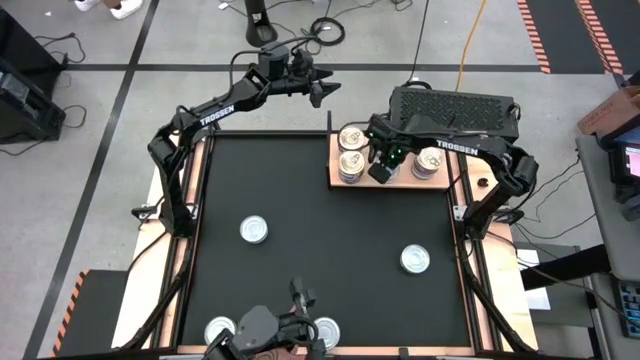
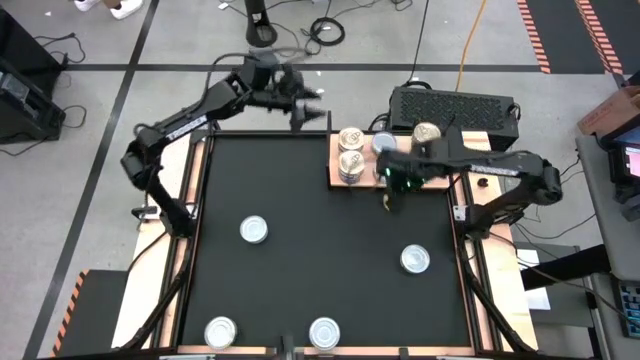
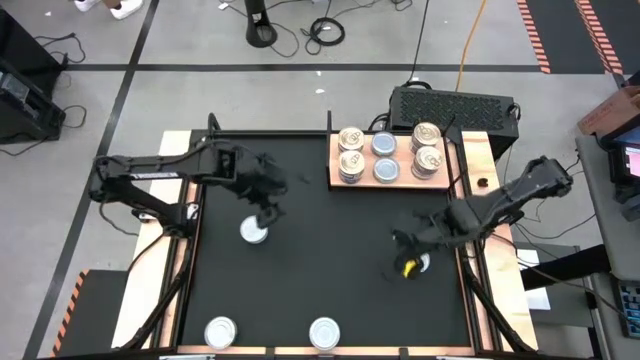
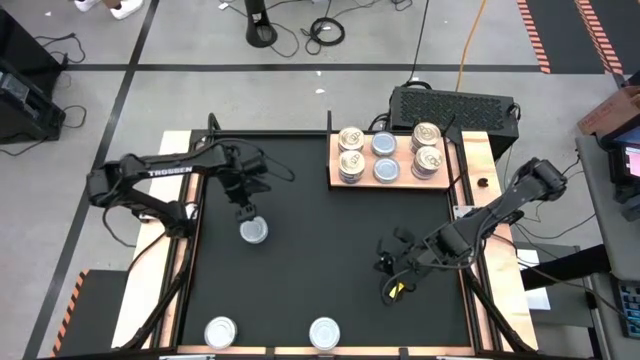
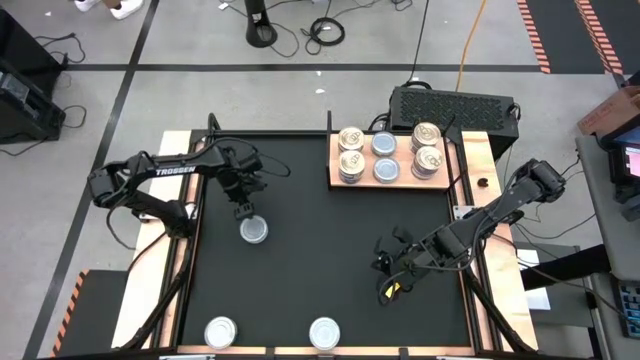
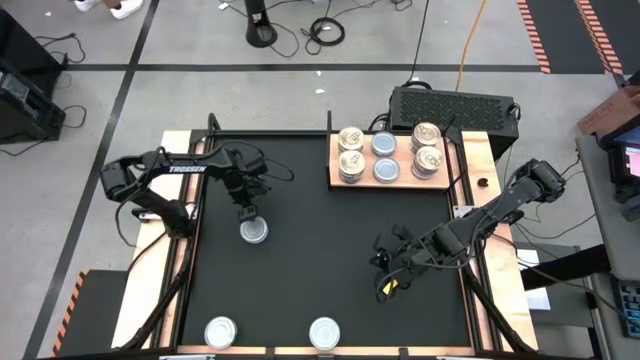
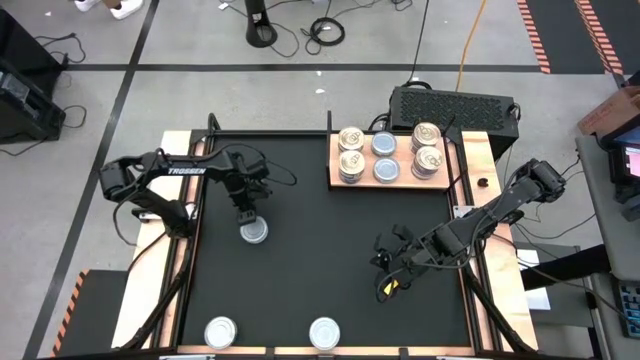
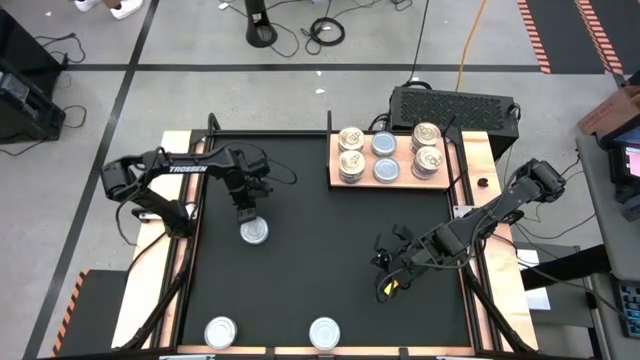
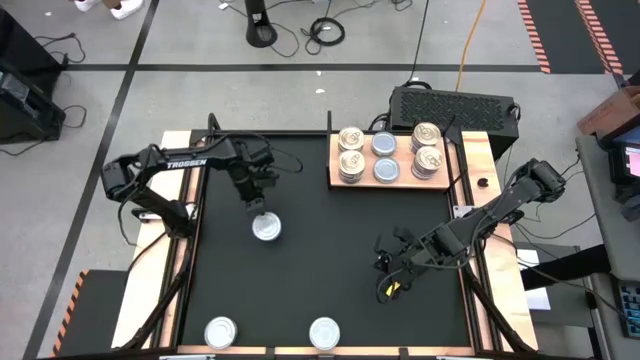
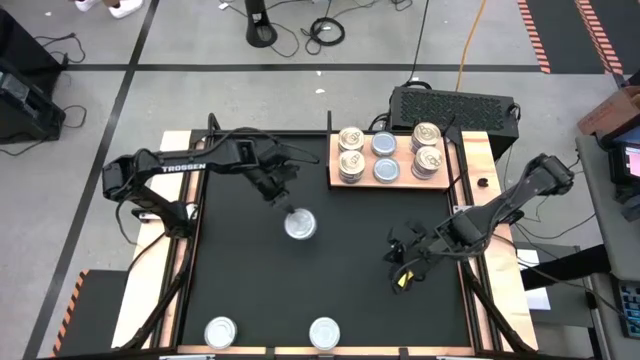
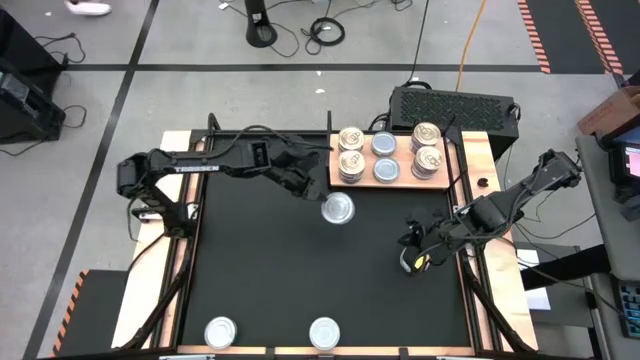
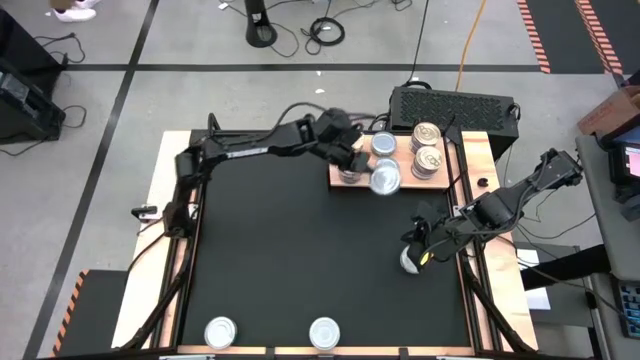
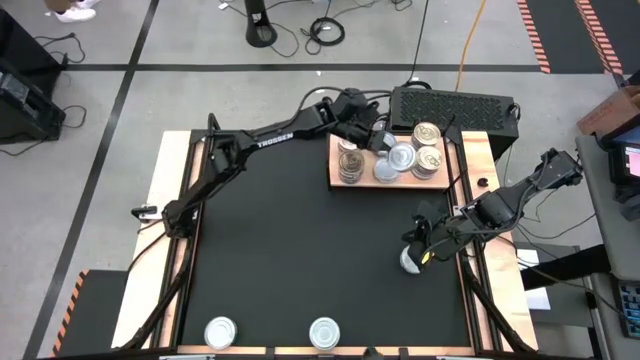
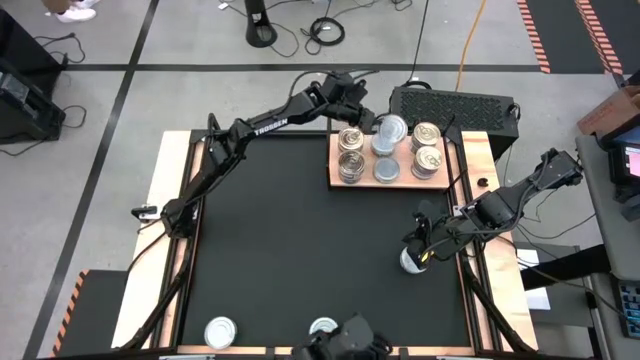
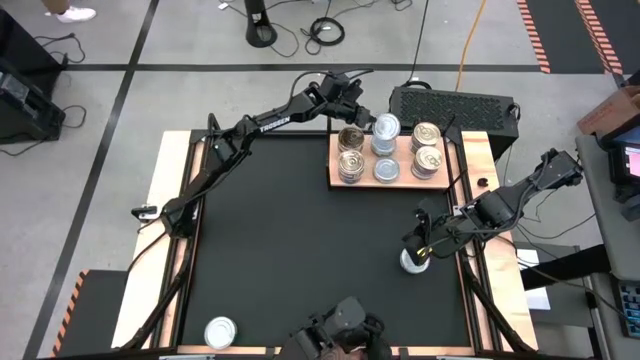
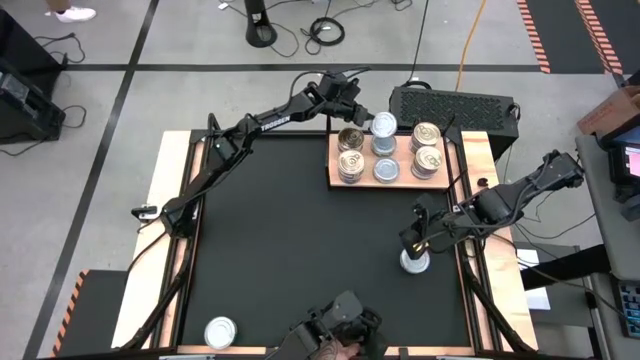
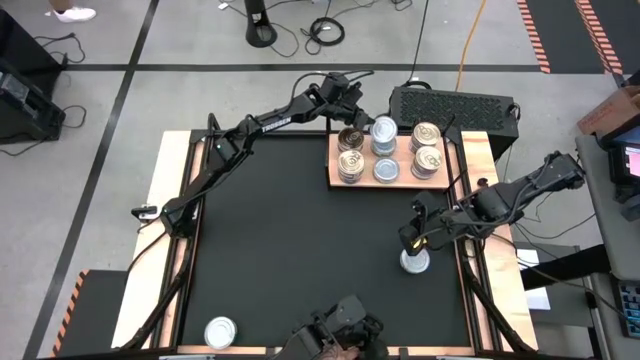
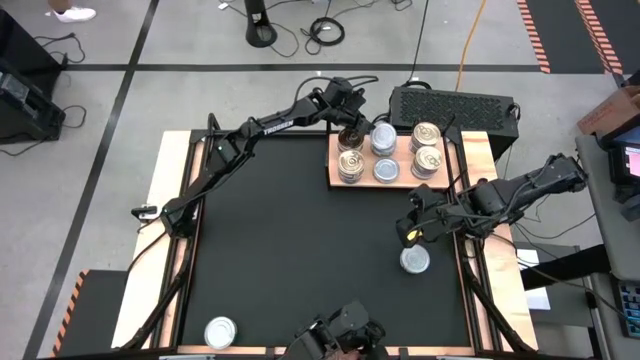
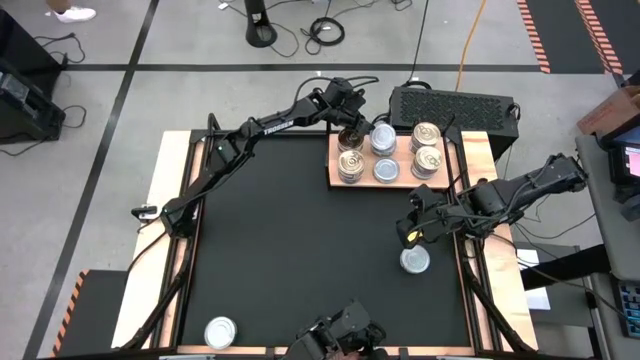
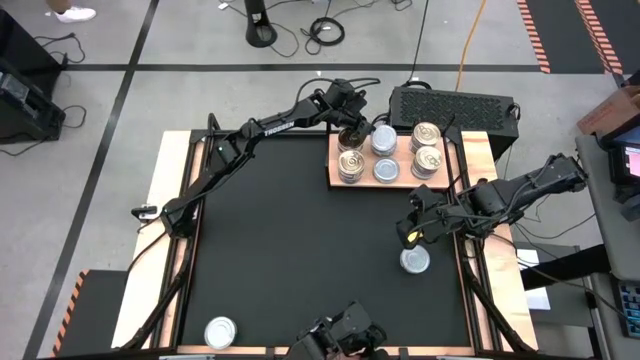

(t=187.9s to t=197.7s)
Task: Stack canned seafood by type on shelf
Stack the green tuna can on top of the other green tuna can on the shelf

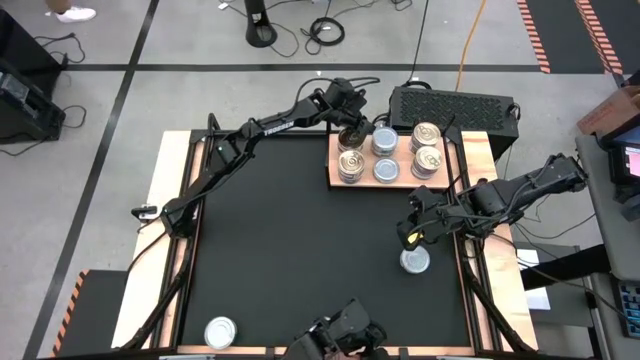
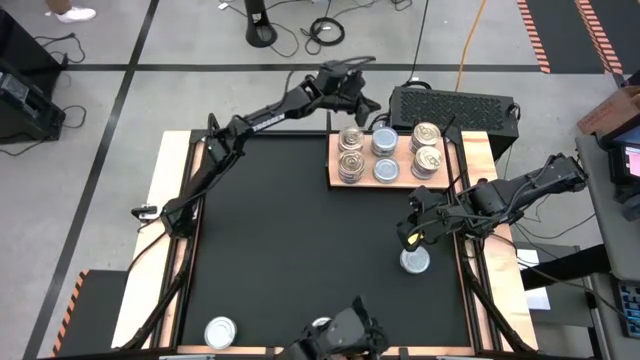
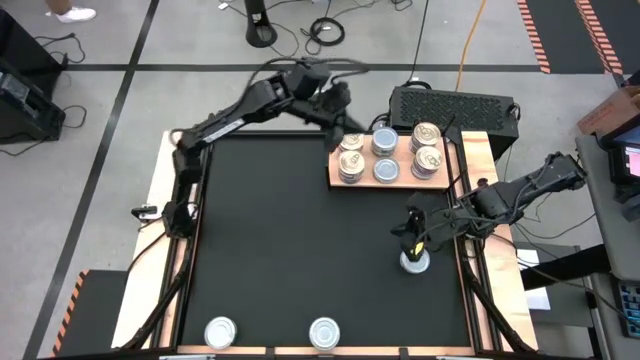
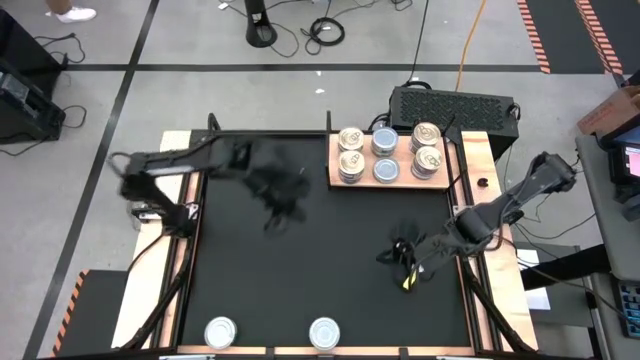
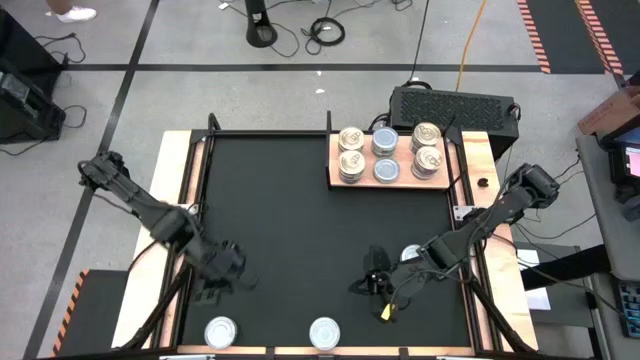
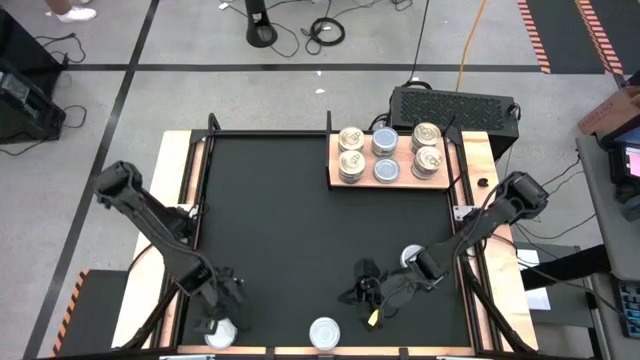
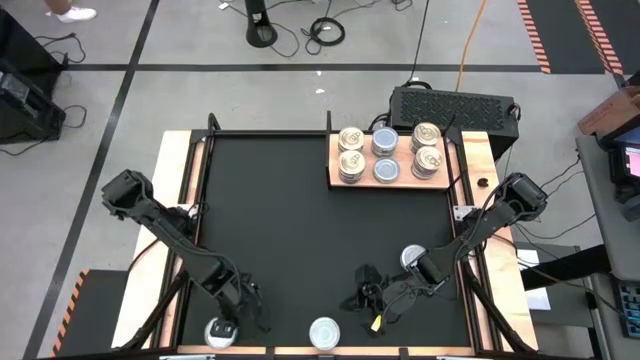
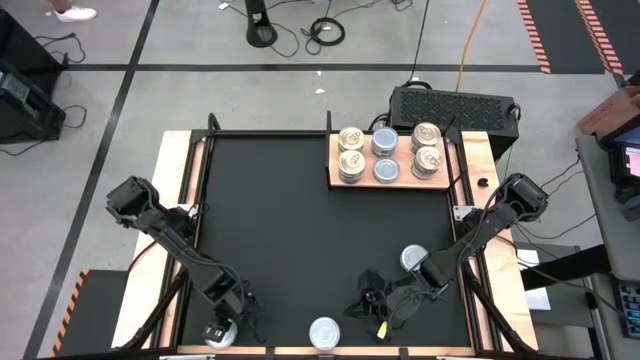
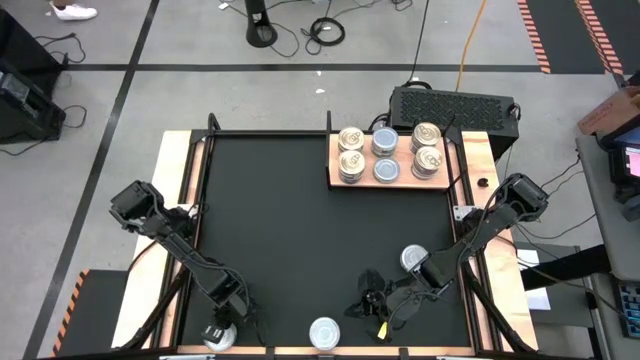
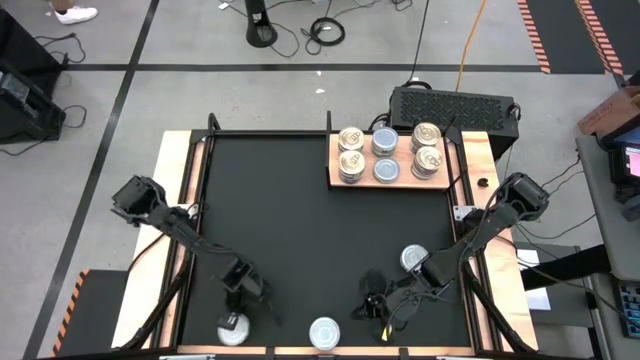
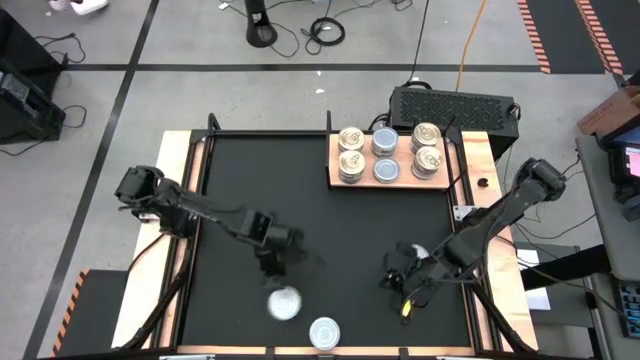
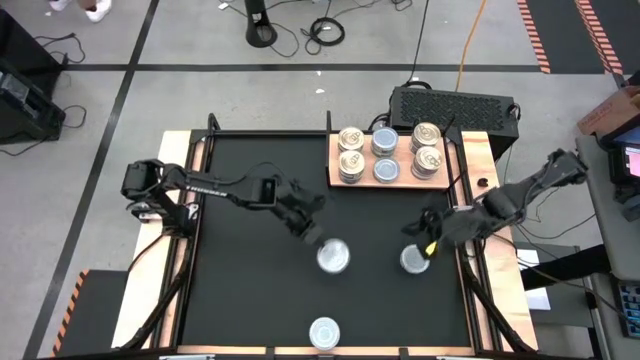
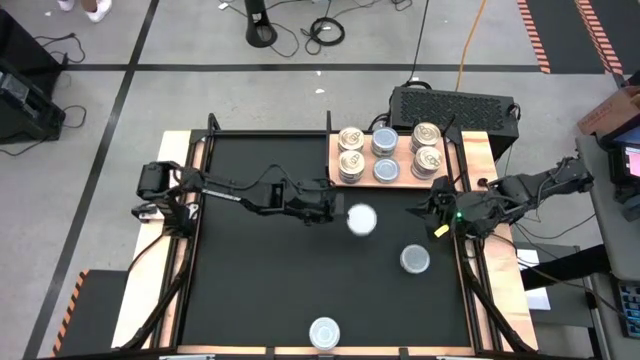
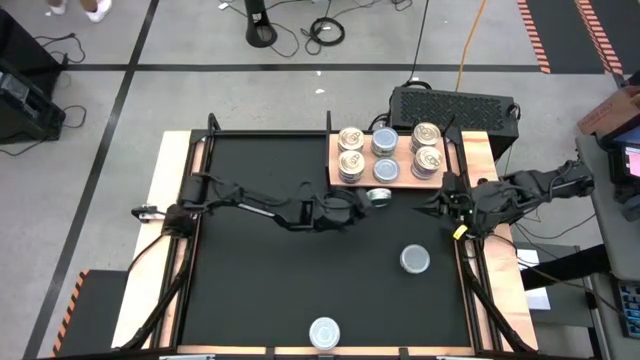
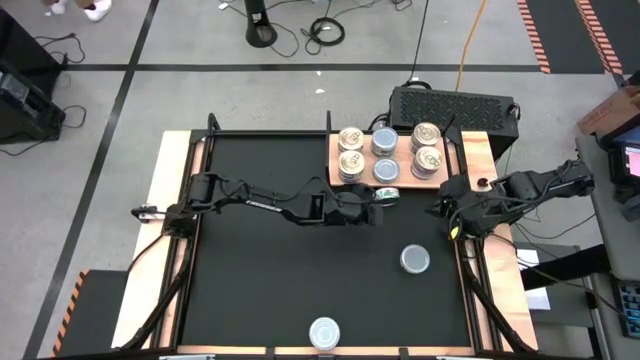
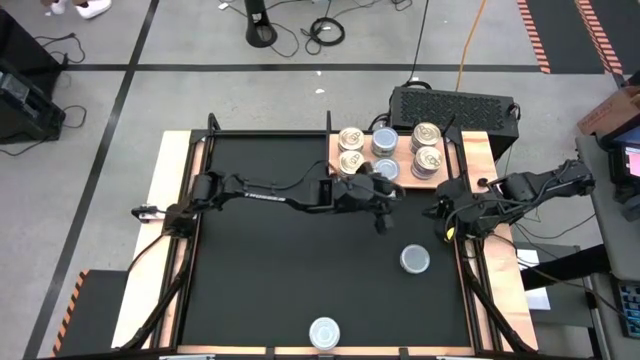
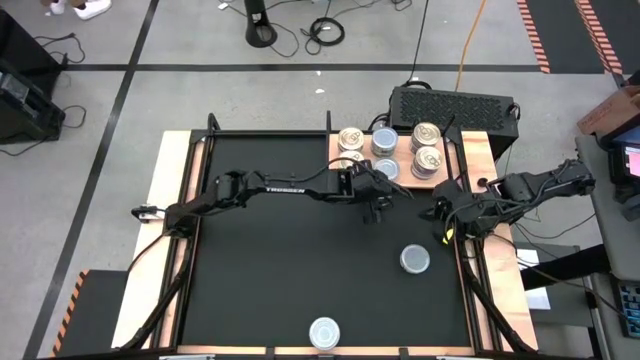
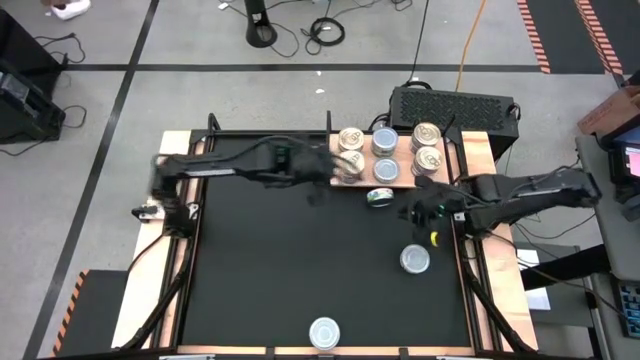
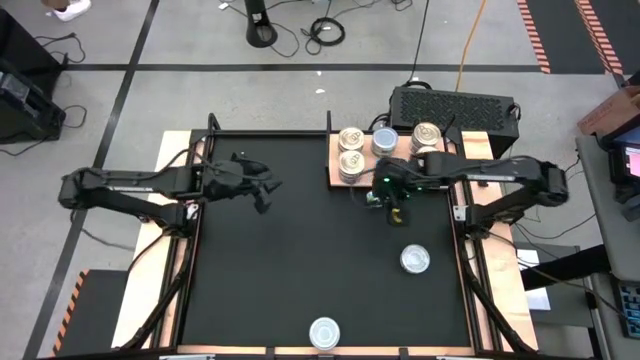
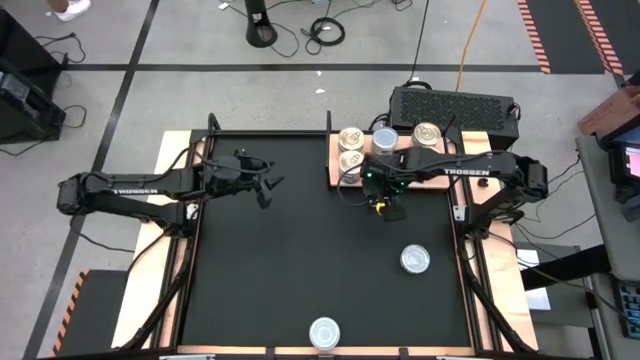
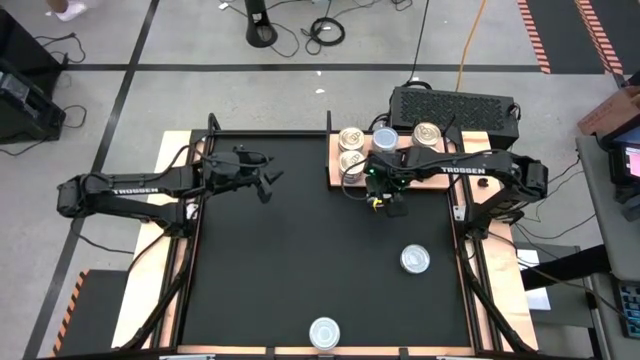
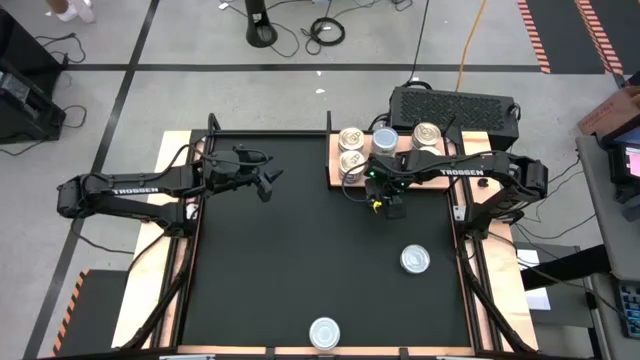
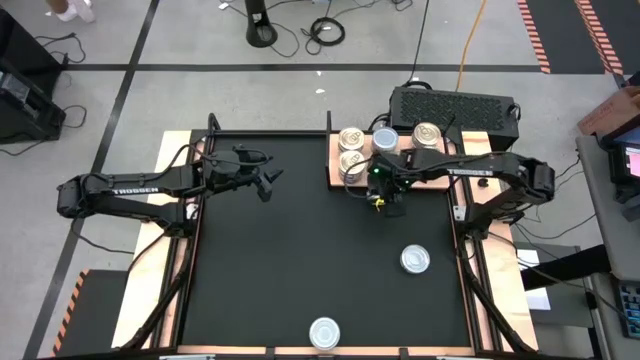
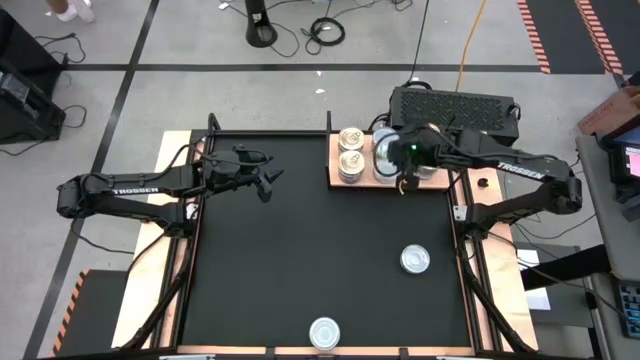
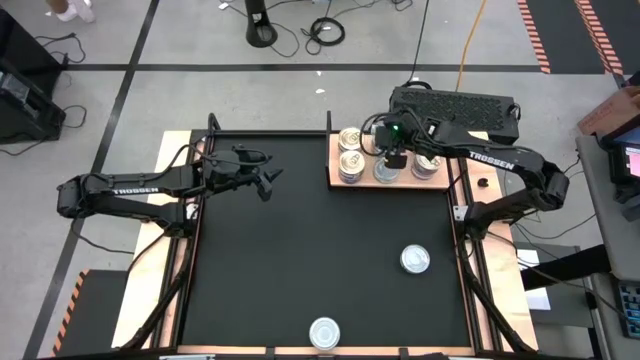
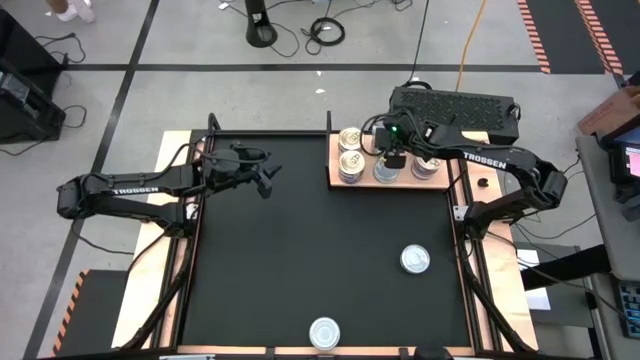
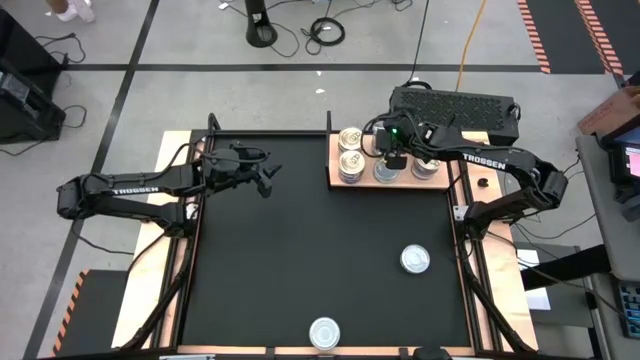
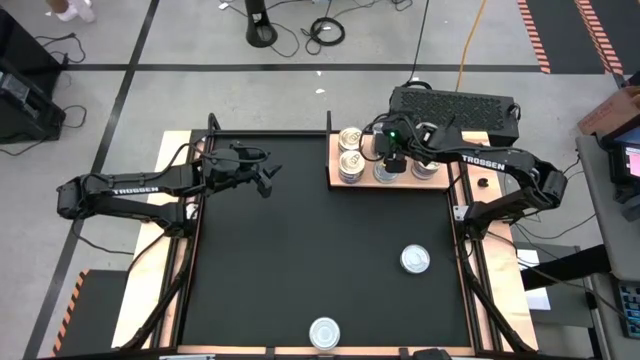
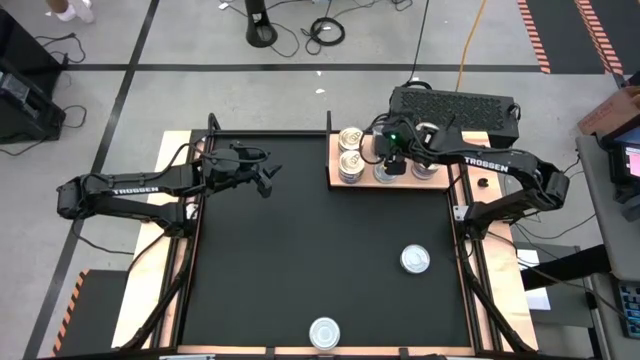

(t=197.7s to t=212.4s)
Stack the green tuna can on top of the other green tuna can on the shelf
